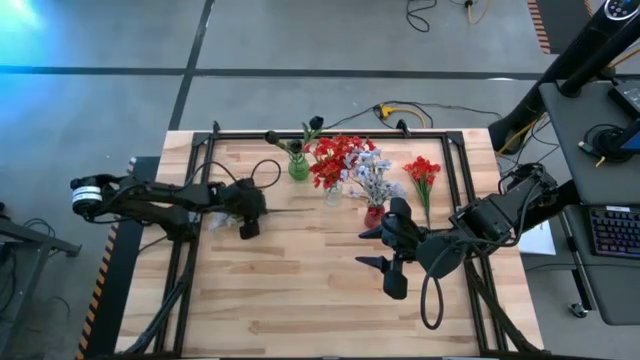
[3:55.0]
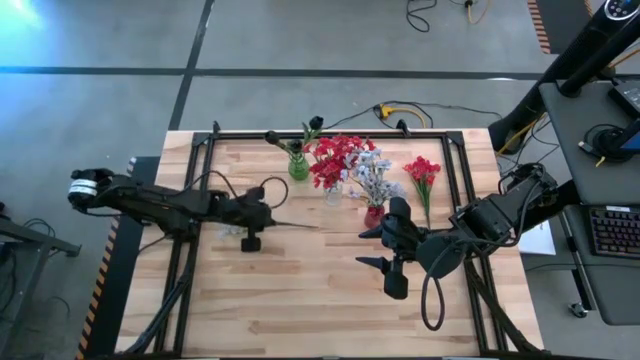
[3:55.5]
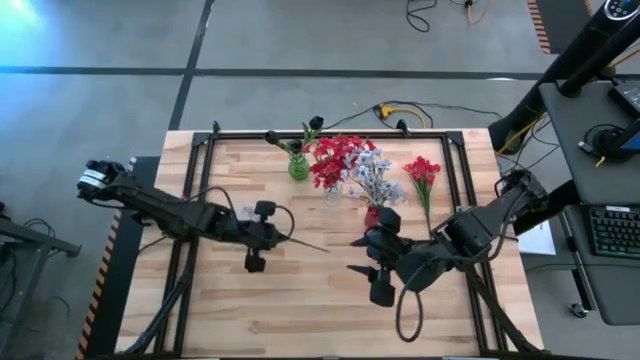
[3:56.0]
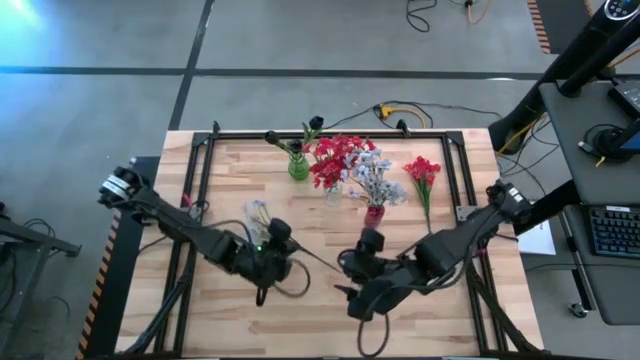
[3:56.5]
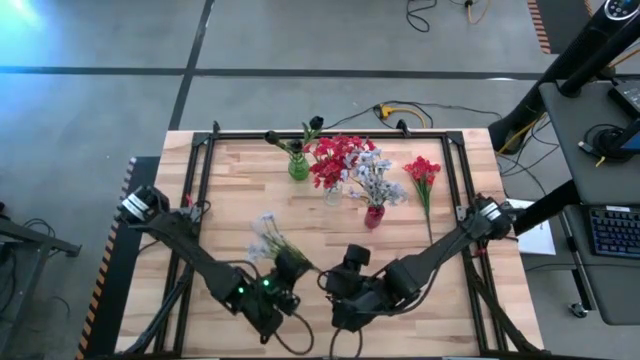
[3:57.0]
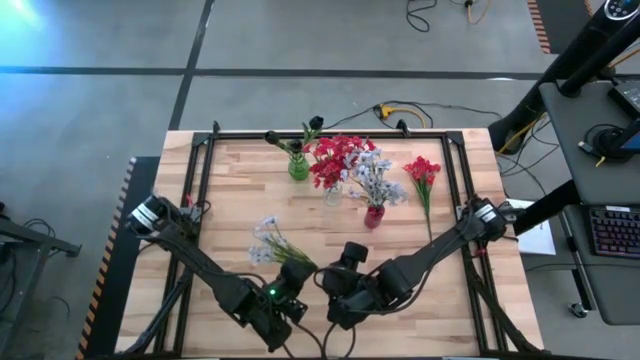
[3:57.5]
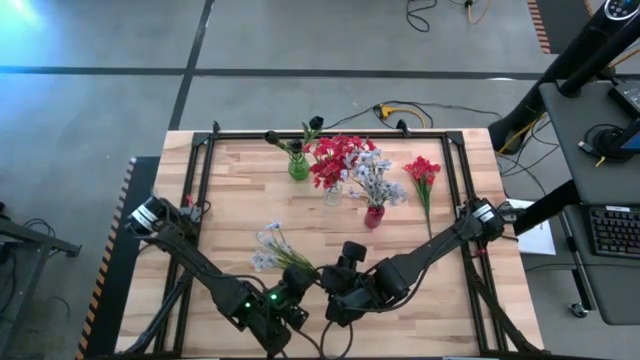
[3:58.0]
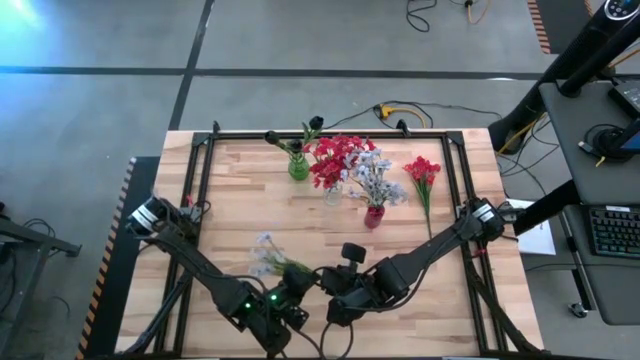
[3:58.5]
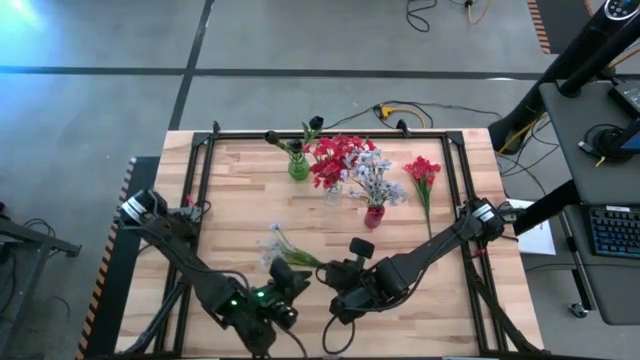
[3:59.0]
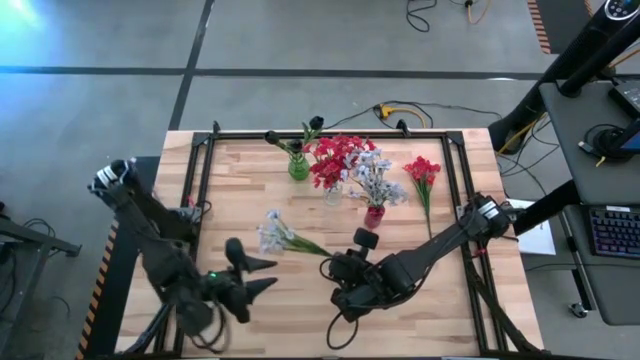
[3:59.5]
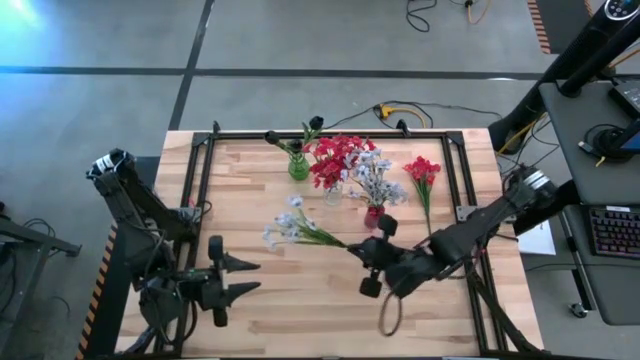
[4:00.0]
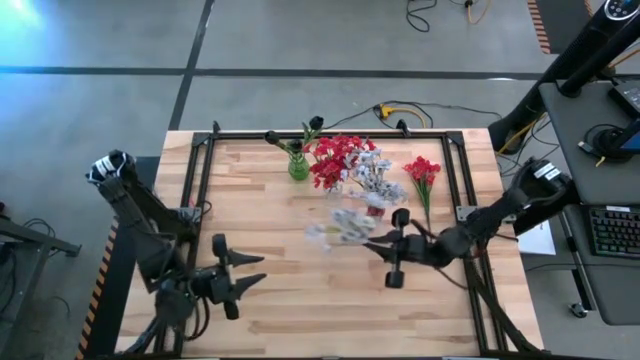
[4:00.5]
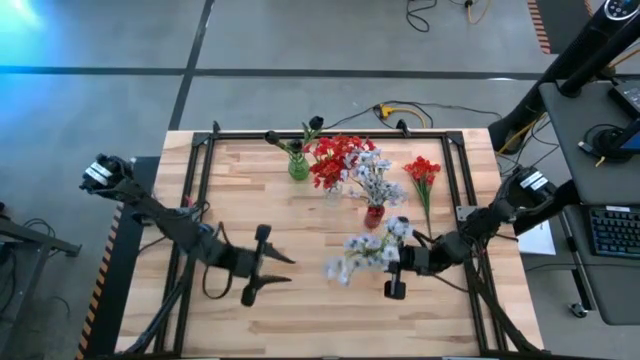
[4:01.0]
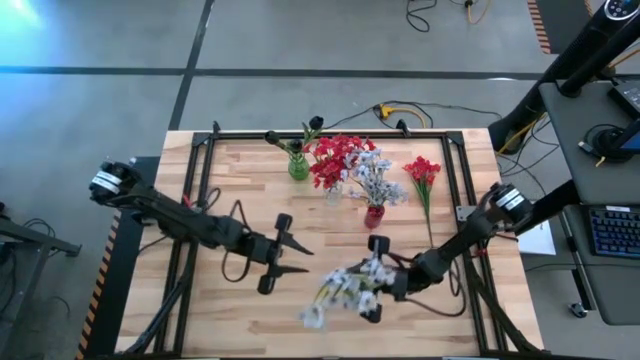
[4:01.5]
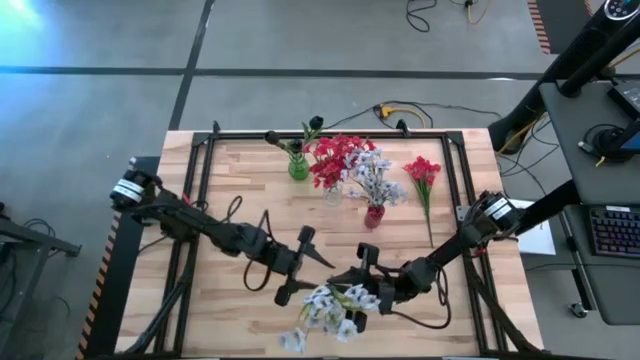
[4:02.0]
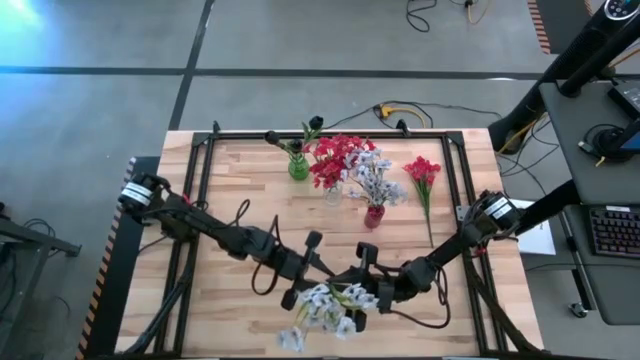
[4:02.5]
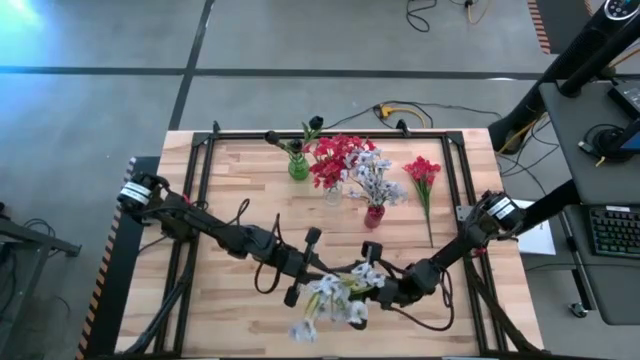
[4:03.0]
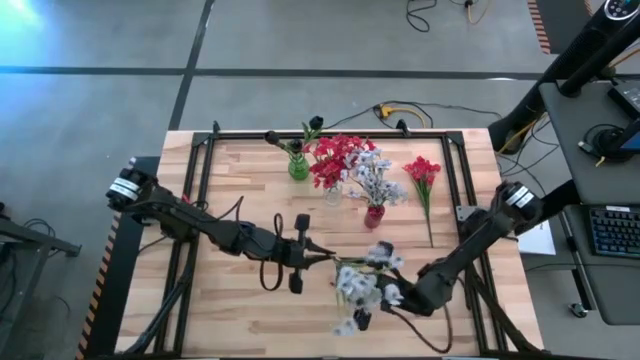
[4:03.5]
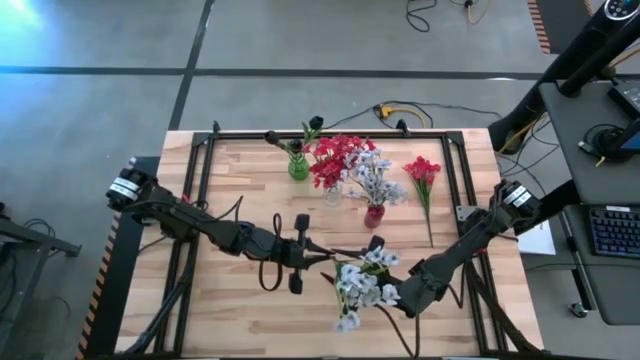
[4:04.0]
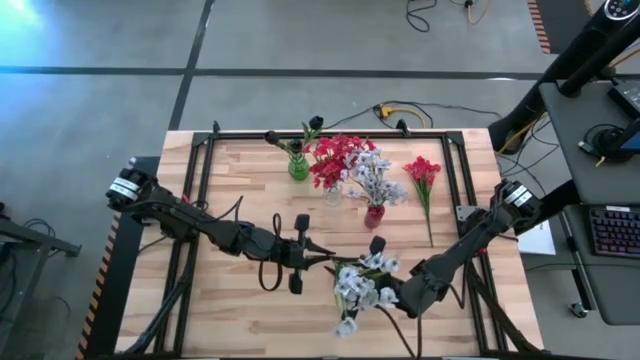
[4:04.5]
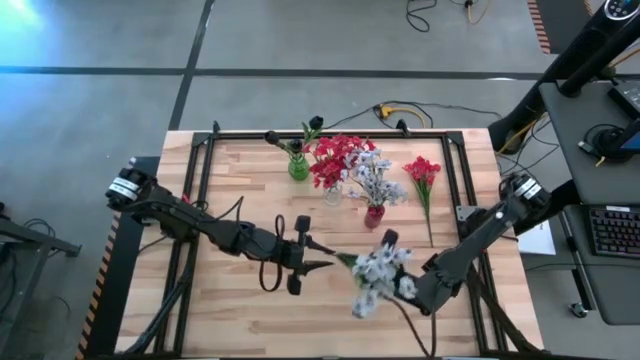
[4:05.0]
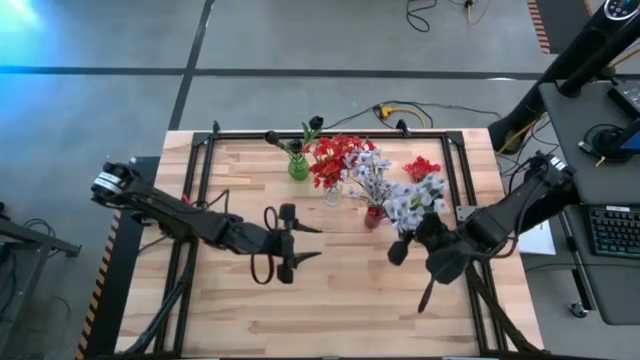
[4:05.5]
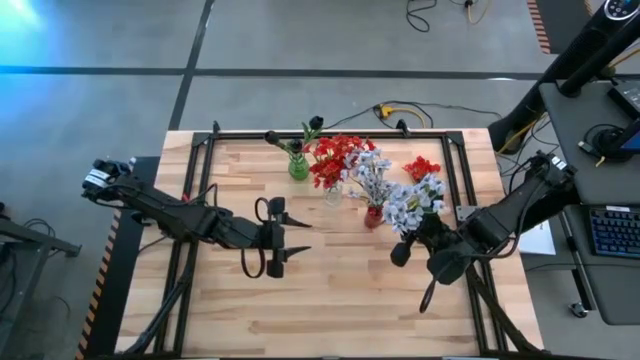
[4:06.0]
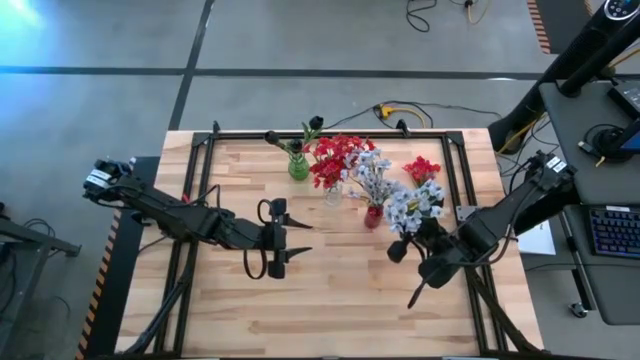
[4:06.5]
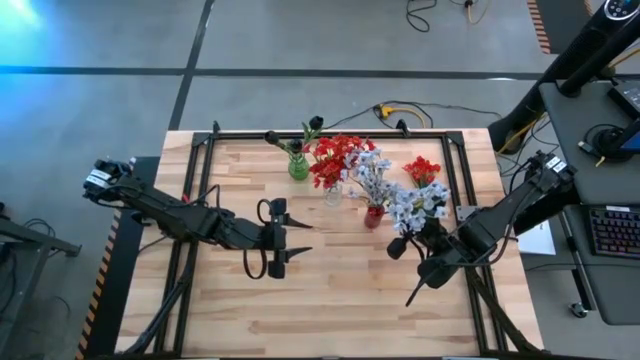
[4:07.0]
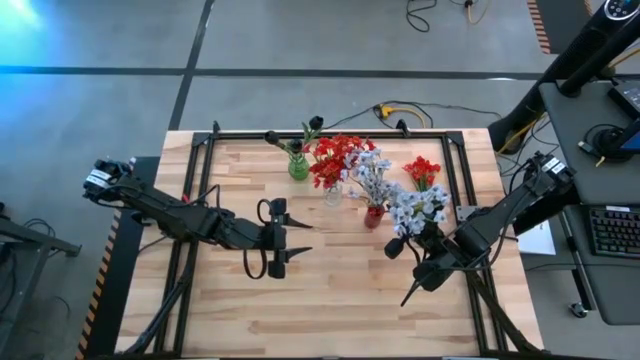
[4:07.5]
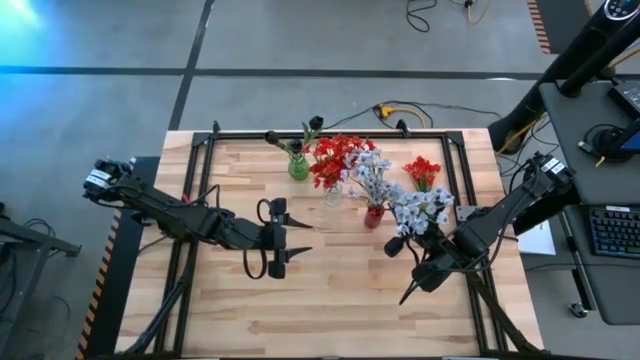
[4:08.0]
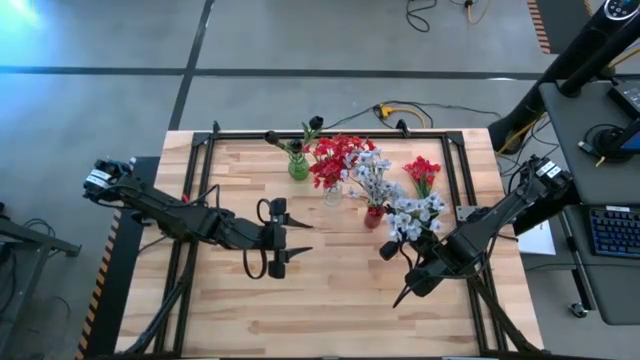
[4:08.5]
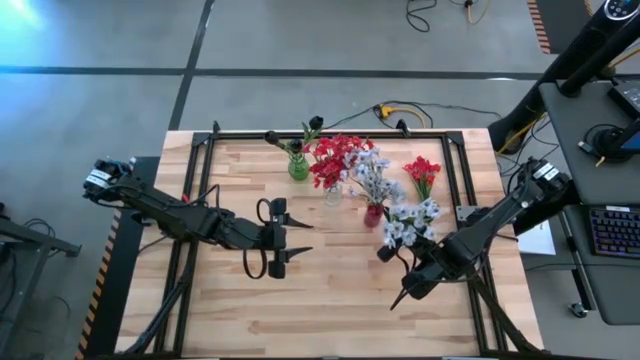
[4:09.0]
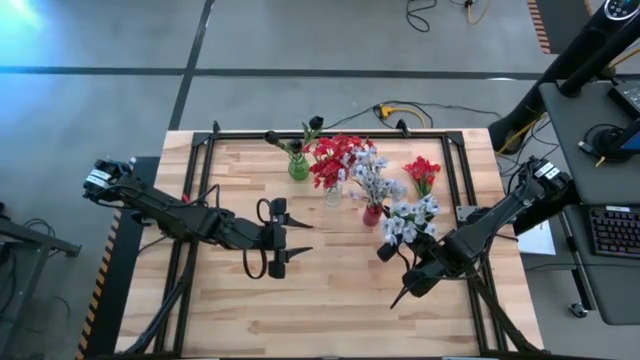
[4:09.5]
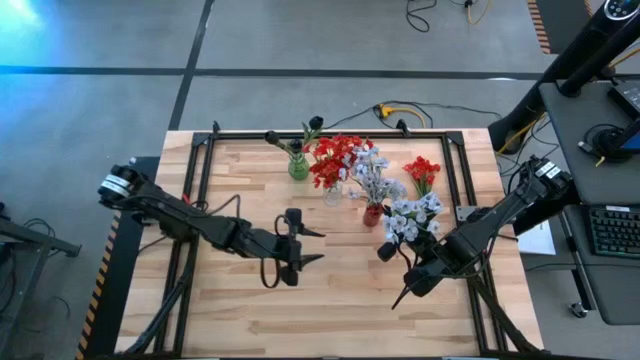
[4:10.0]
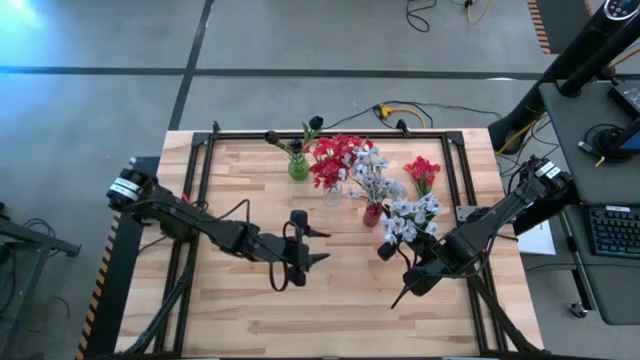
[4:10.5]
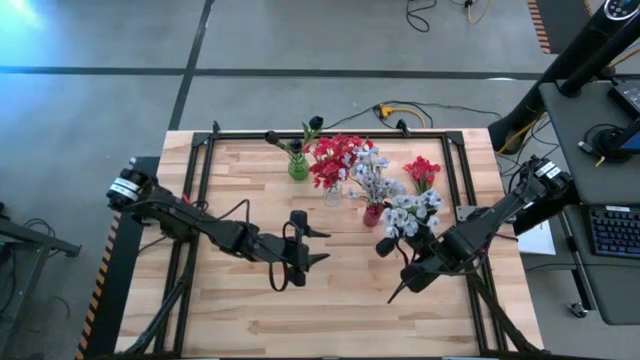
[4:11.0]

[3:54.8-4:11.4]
Task: Sort flowers into vase by color
Put the white flowers into the red vase

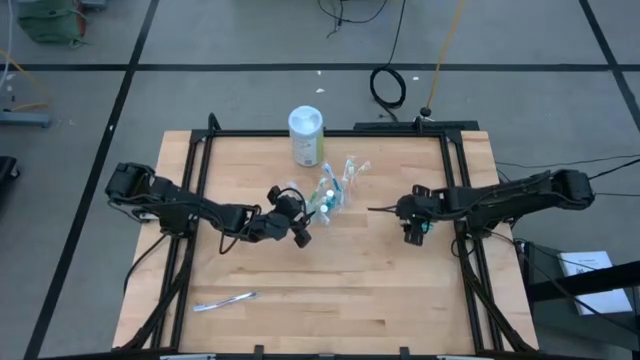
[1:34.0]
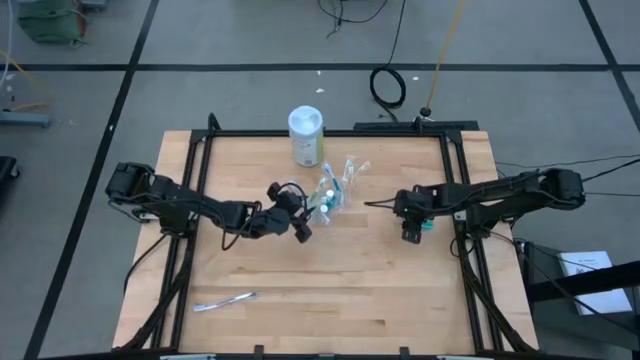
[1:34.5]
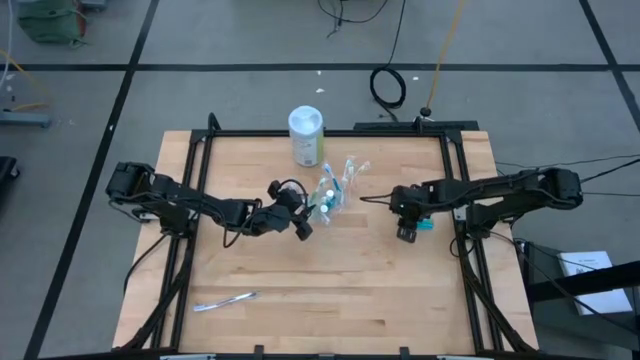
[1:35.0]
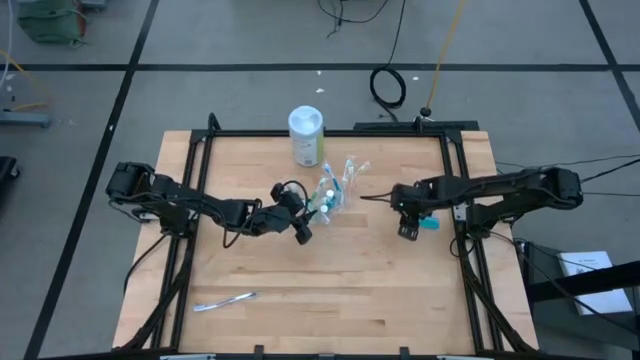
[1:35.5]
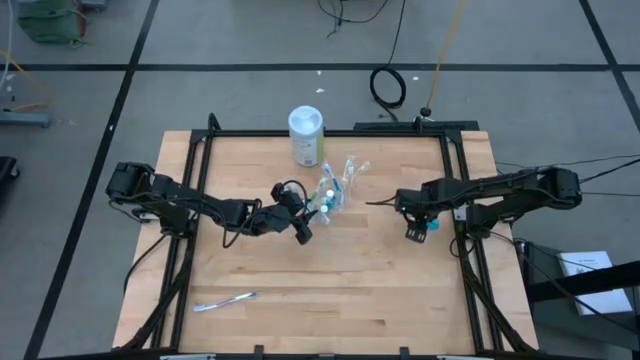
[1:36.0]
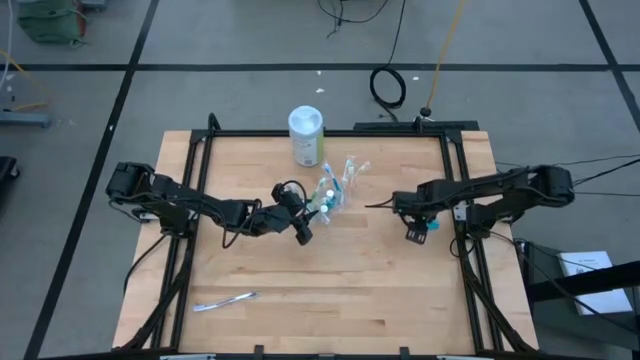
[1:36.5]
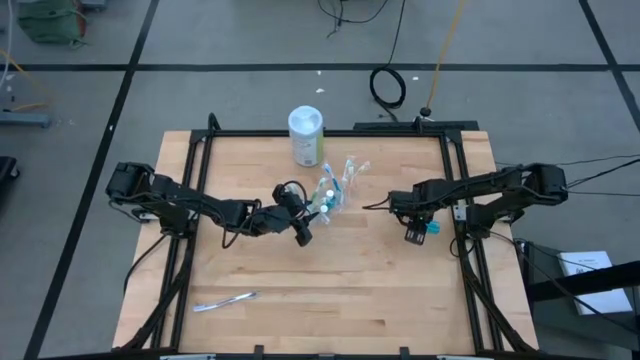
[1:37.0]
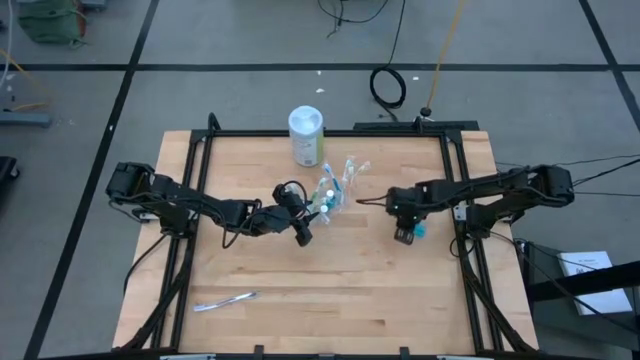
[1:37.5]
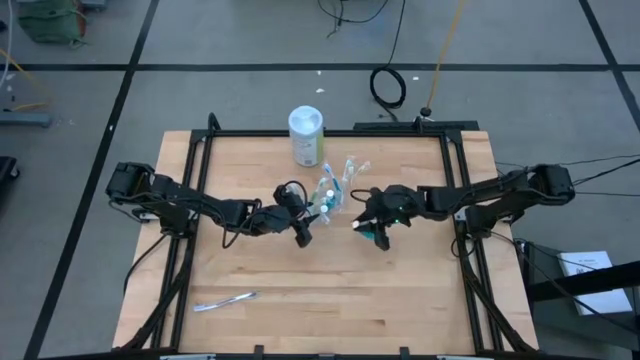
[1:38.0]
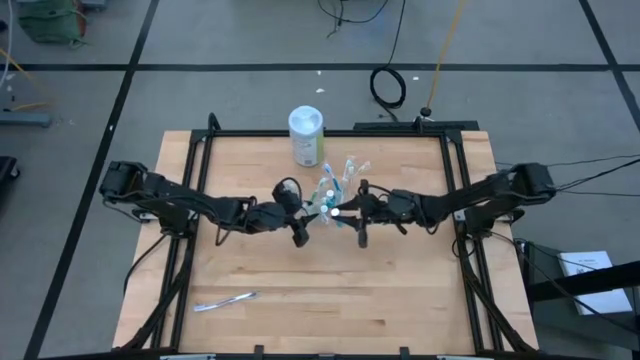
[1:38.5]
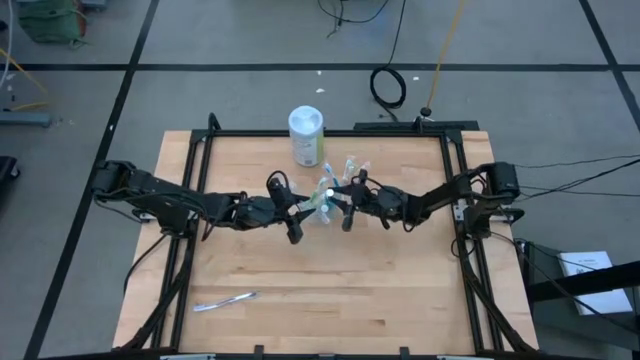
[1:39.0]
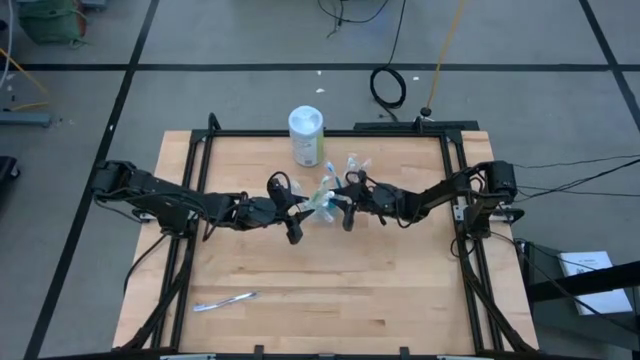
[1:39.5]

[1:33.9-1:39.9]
Task: Pick & Place toothbrushing station
Put the blue mouthwash into the transparent organizer
